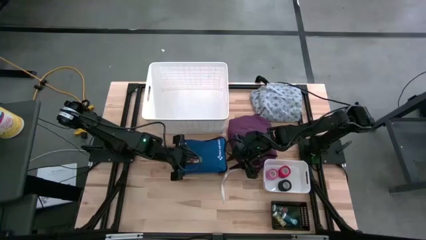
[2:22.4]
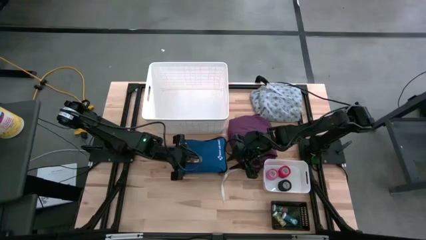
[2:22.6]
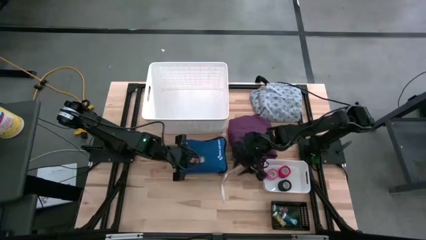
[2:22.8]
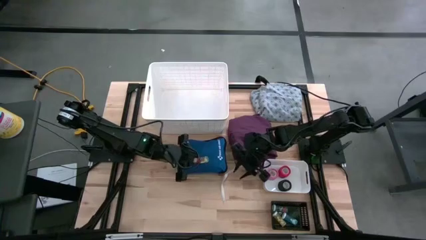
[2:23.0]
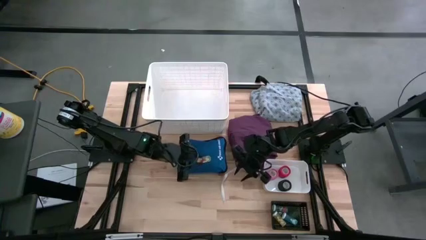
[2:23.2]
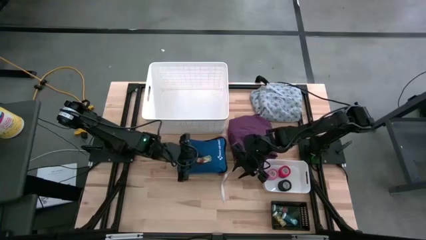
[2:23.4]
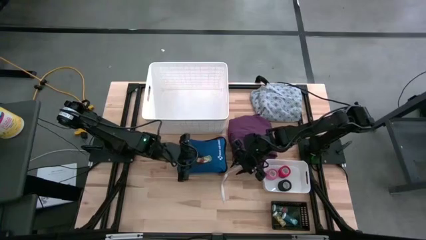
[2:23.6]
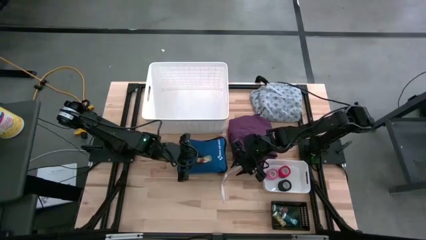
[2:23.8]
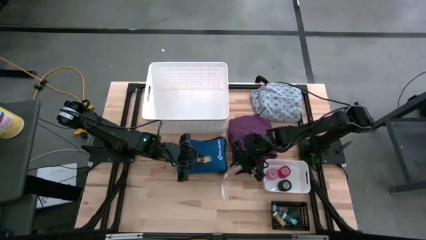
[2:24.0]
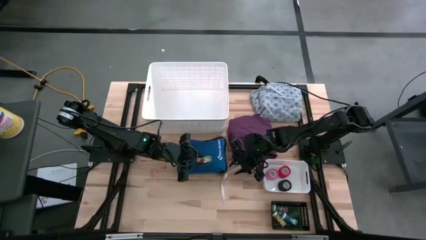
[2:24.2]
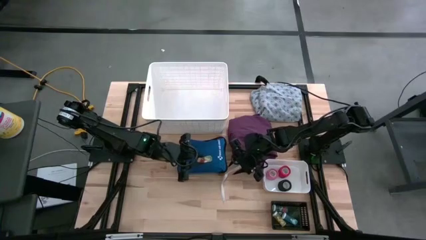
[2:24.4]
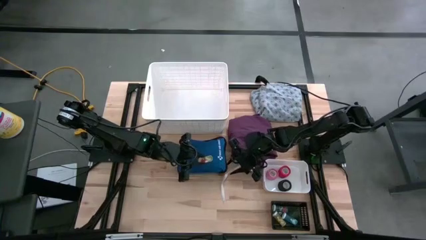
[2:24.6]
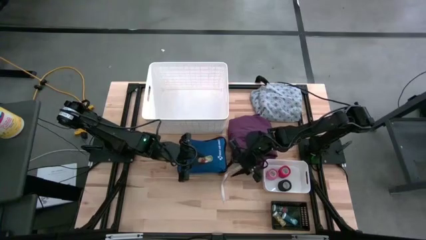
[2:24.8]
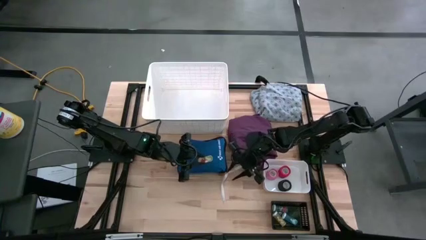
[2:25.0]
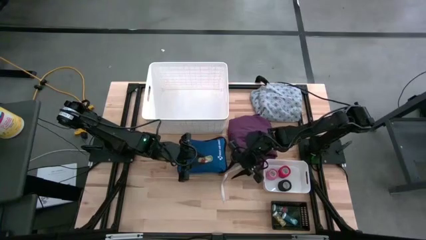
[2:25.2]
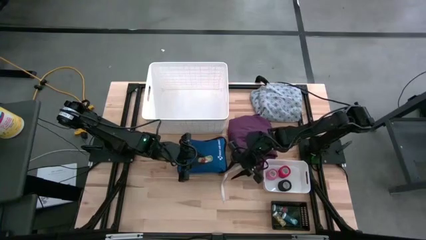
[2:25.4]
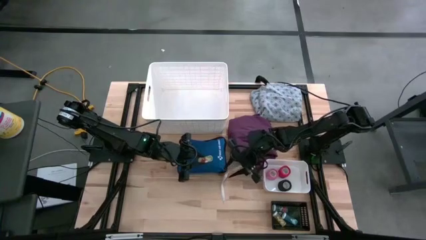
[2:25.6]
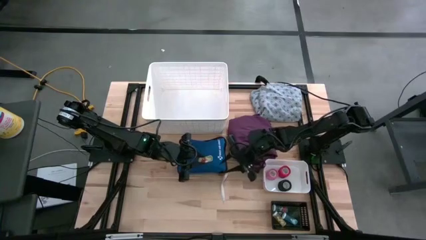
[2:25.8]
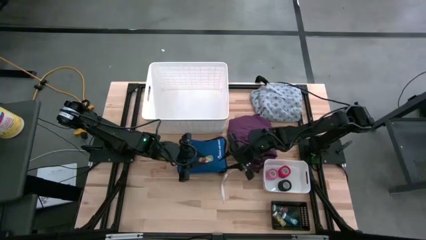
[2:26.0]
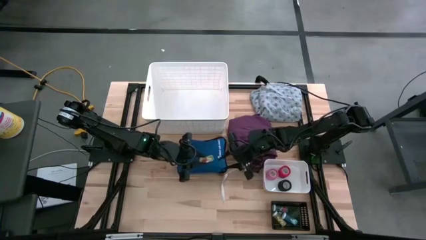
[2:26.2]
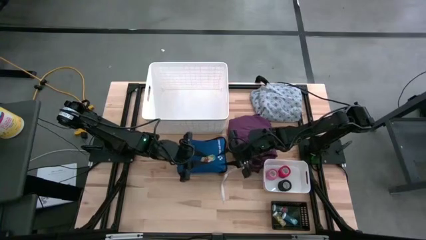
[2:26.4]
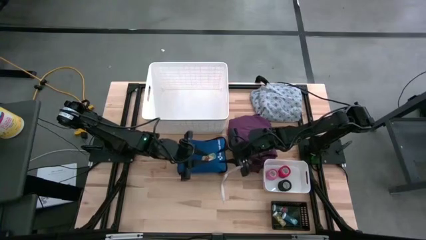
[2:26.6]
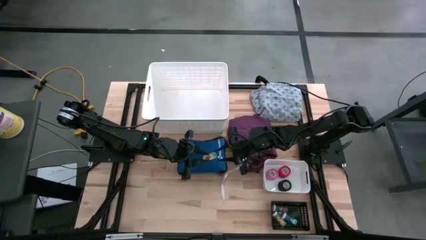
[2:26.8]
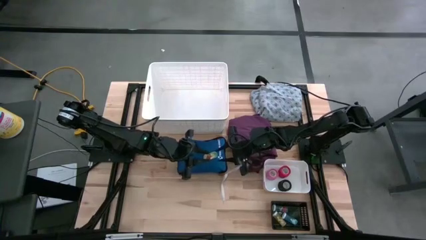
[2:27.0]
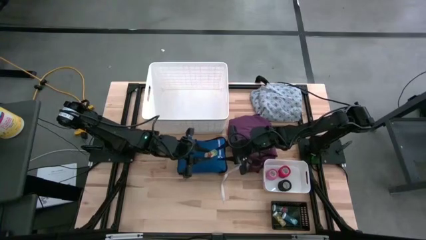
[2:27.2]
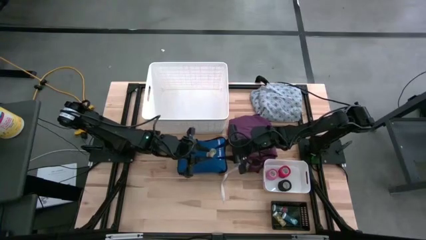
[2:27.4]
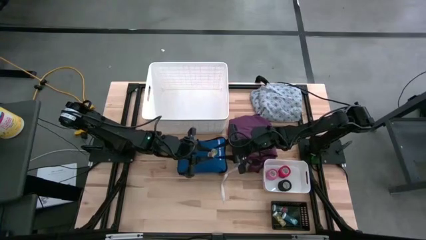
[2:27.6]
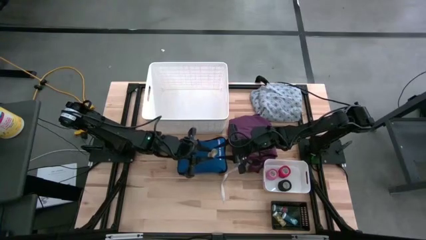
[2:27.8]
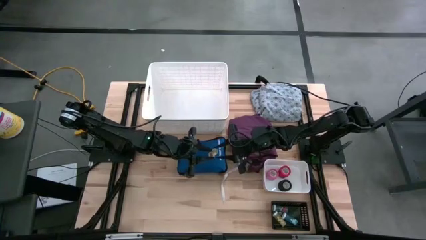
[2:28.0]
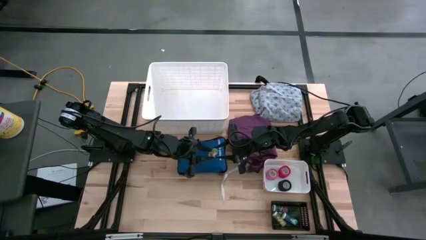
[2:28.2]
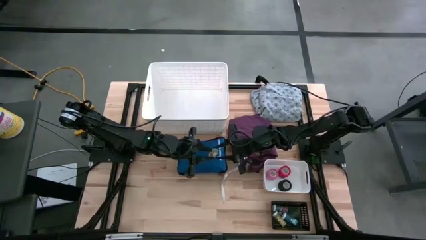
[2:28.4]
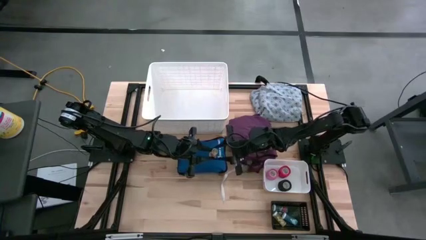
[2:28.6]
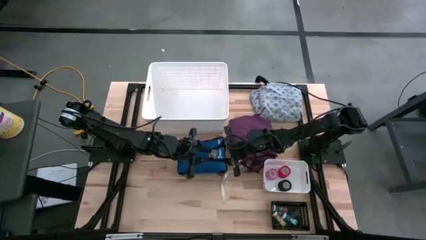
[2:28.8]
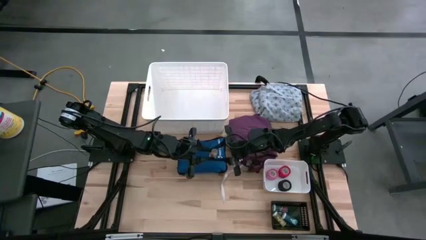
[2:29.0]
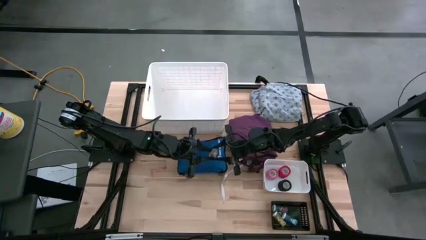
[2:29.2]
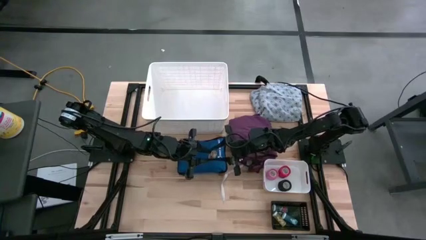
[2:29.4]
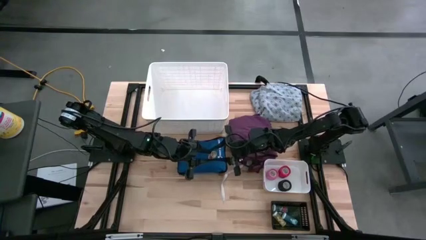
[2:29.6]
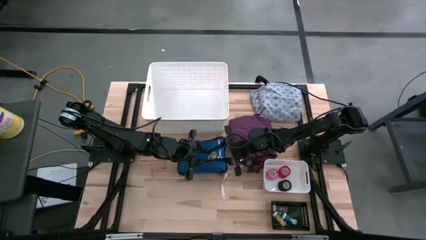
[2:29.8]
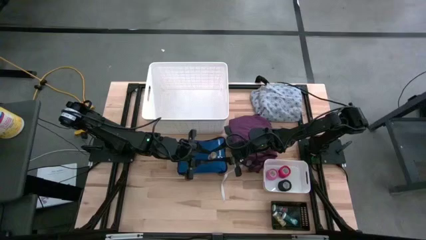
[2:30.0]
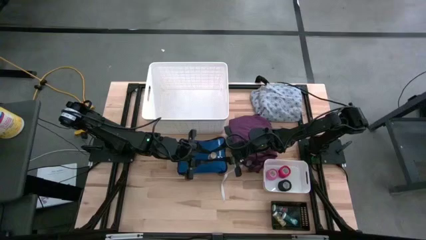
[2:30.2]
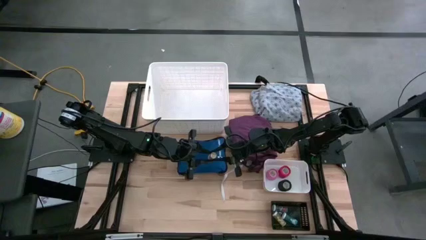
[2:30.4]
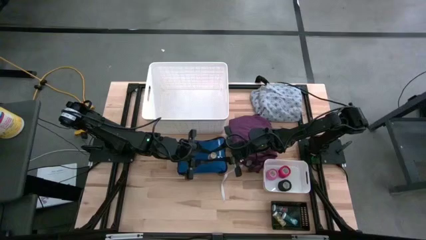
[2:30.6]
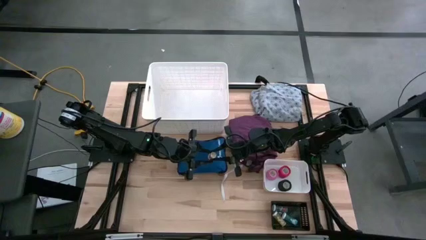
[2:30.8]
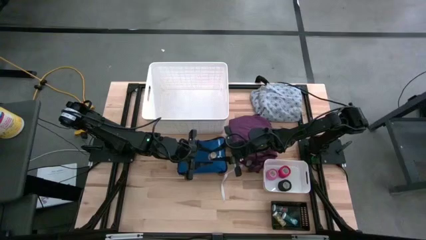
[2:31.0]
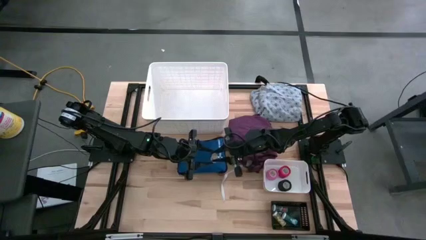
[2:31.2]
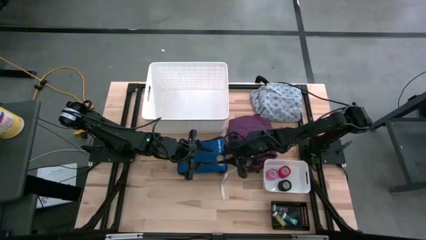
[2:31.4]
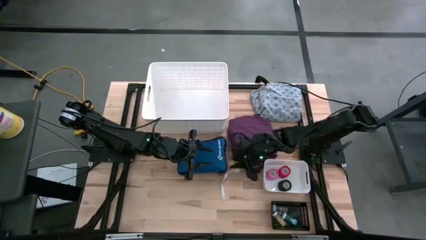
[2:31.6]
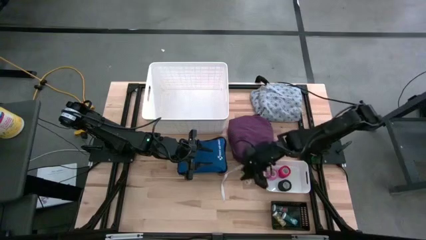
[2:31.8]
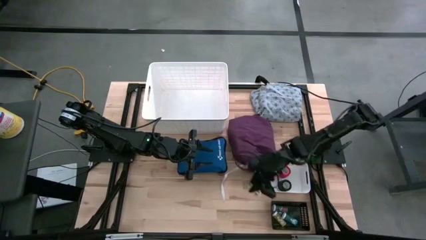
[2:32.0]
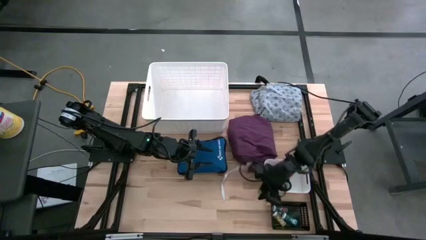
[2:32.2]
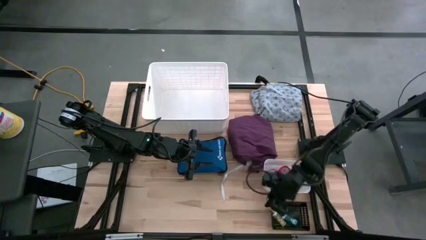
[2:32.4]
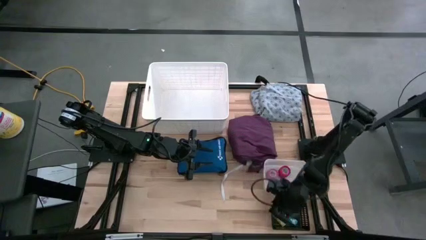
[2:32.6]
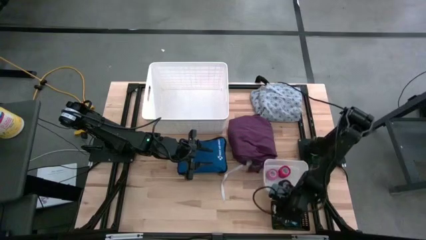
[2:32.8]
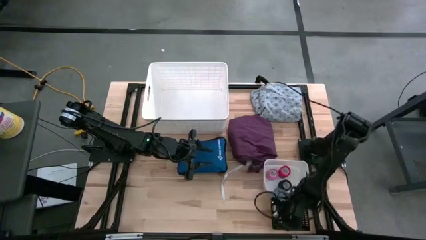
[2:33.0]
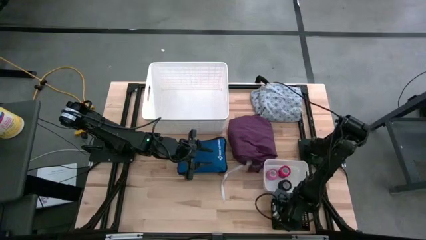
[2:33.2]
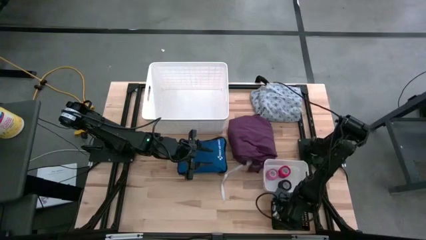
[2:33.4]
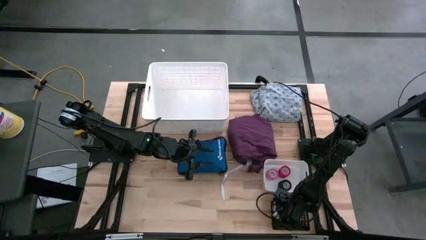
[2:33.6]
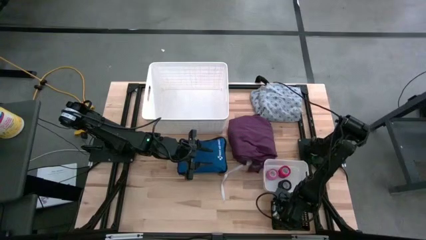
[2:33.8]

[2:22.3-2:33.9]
Task: Pick & Place Medicine items
Put the yellow pill bottle into the black bin

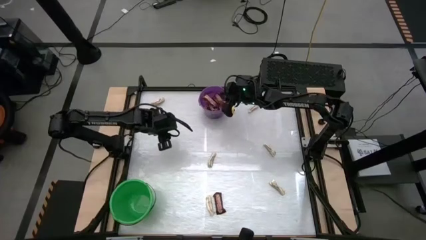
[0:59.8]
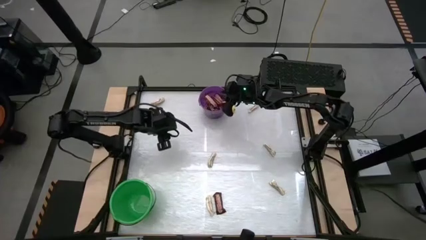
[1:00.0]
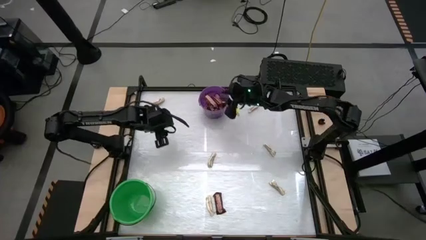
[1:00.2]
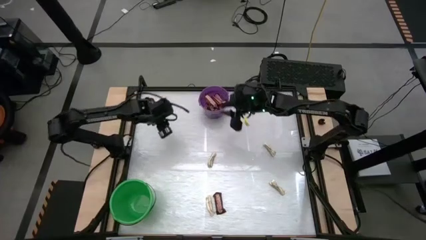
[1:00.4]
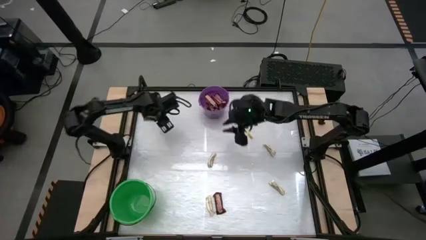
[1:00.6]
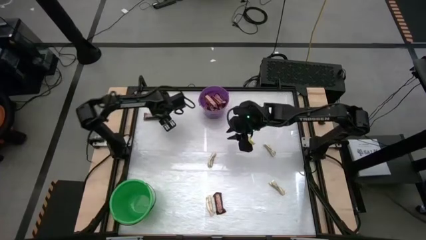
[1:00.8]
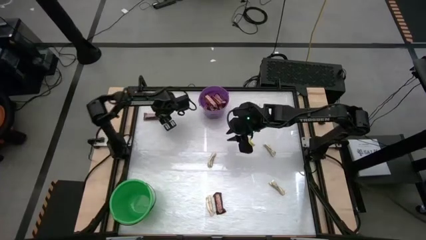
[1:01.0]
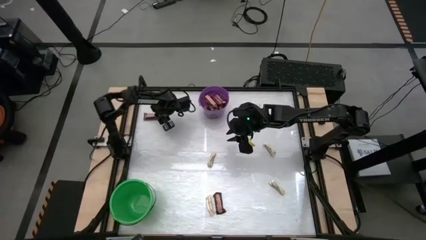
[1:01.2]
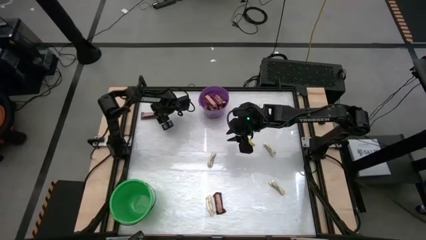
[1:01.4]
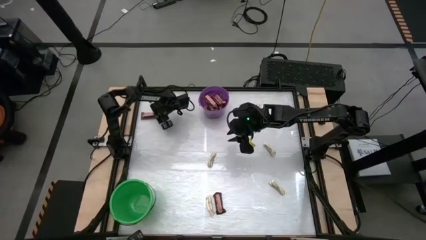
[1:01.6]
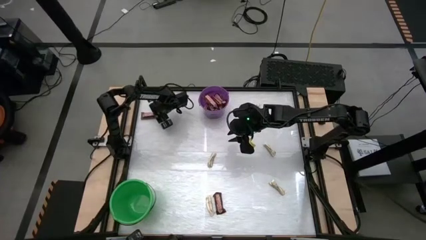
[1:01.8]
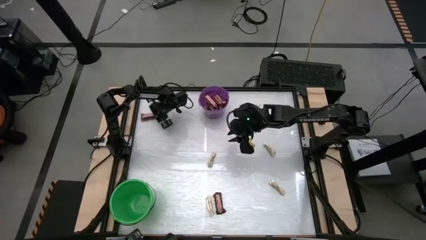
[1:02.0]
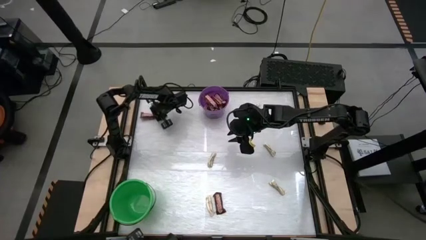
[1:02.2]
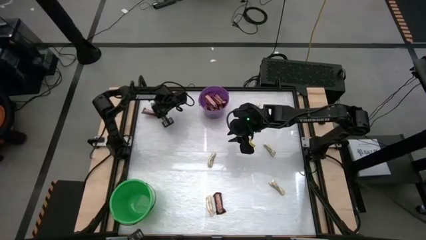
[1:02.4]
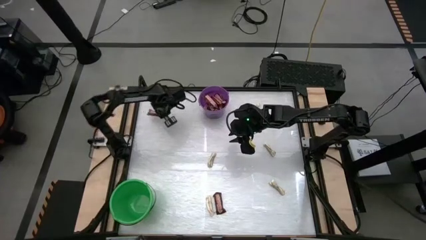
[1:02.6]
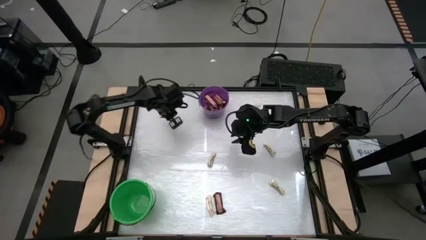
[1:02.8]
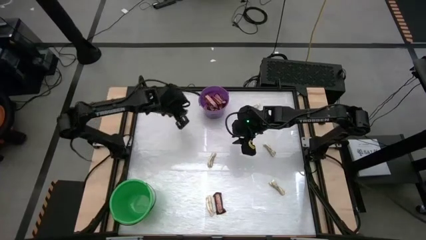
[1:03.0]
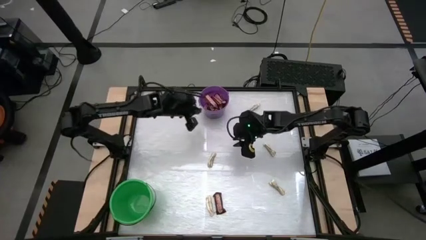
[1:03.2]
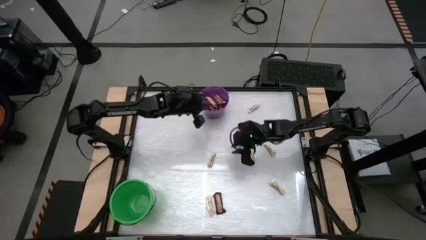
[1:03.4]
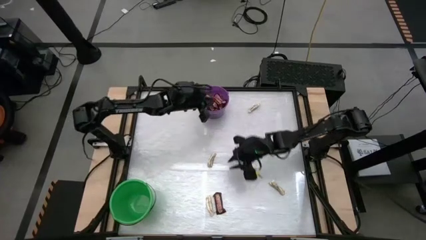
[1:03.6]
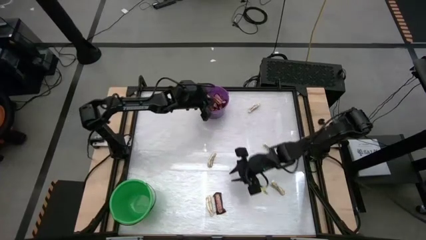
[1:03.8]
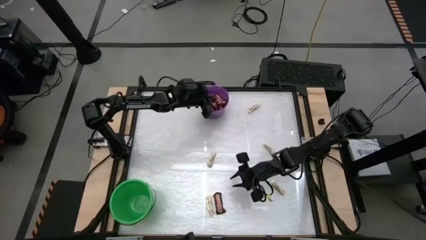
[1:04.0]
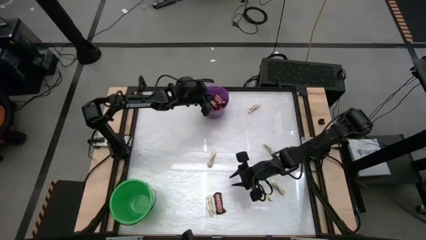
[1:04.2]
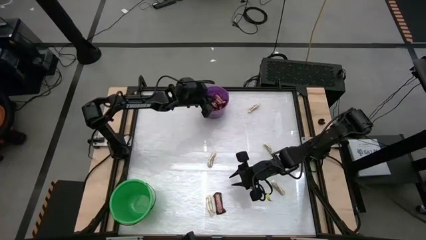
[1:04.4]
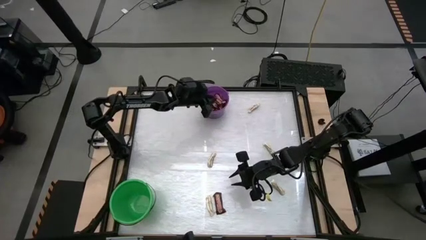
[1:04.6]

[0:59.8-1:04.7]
Task: Sort candy by brand, put in halloween buckets
Put the brown chocolate into the purple bucket

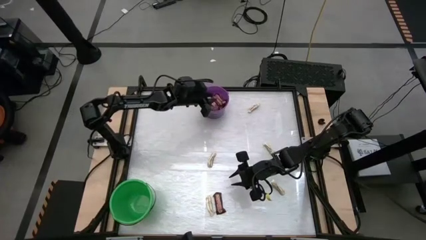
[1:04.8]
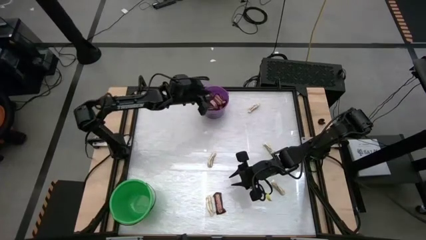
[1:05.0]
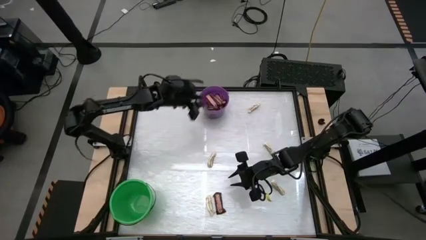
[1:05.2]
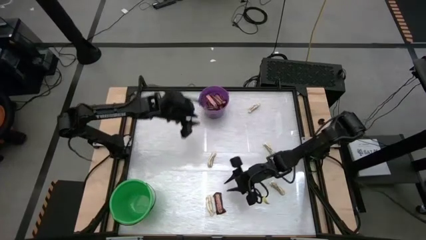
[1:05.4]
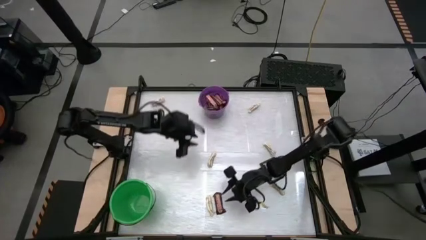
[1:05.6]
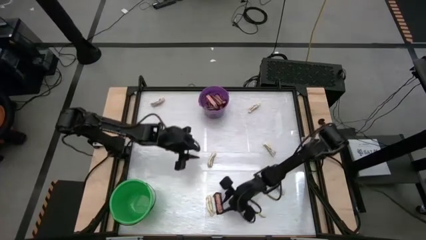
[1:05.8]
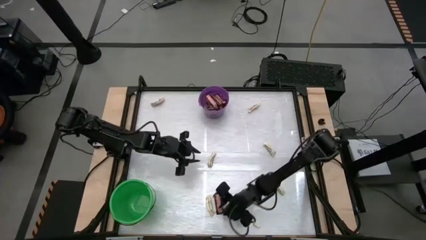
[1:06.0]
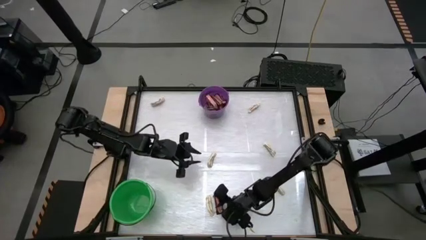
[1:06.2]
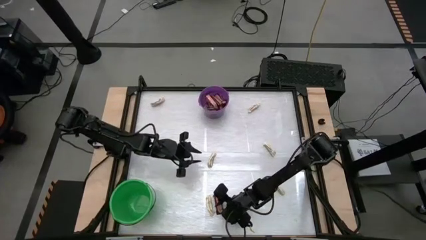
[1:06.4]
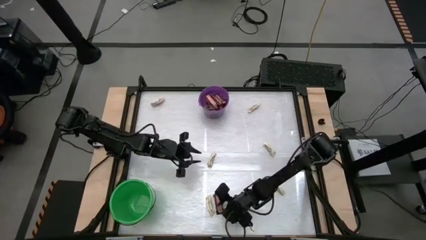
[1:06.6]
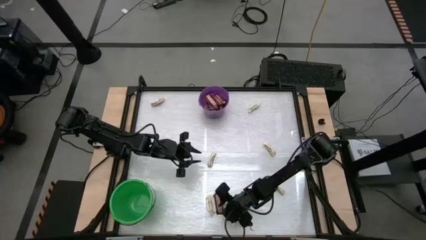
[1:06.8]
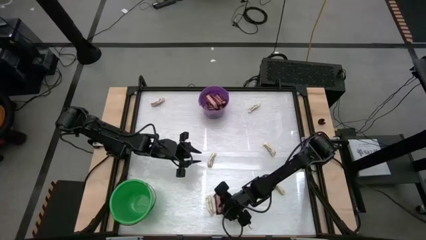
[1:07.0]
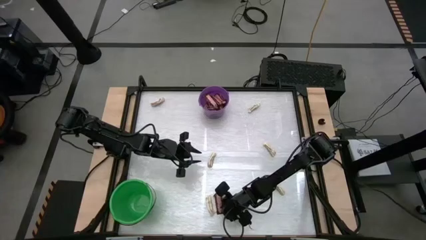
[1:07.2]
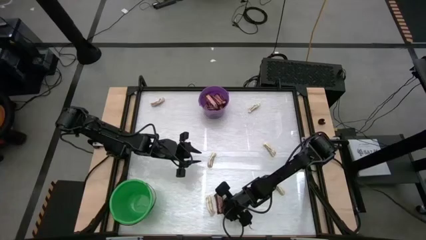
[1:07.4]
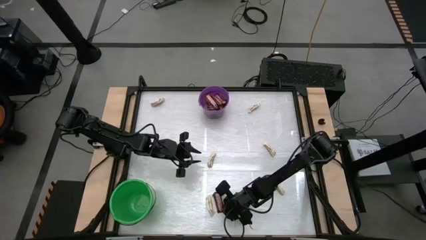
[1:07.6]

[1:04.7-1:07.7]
Put the brown chocolate into the purple bucket
